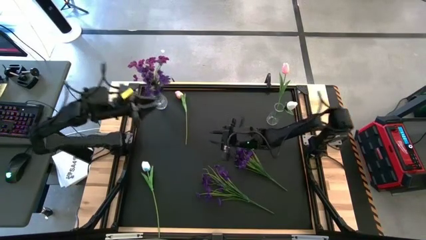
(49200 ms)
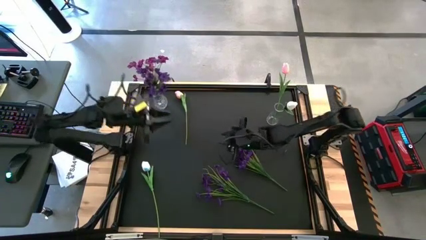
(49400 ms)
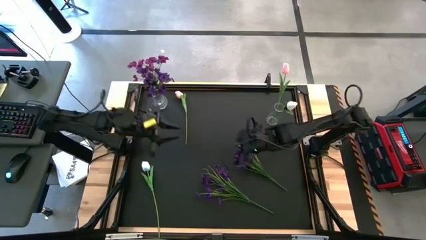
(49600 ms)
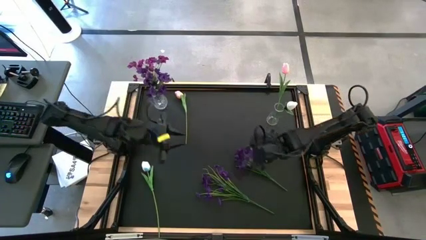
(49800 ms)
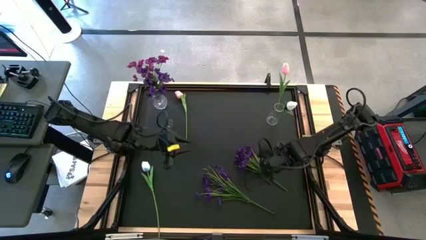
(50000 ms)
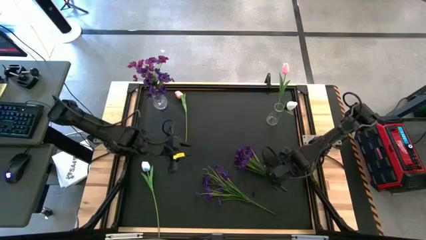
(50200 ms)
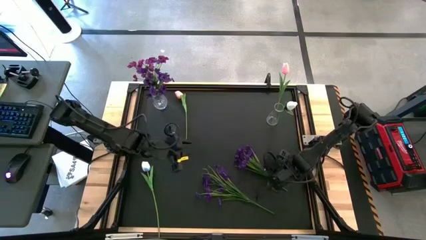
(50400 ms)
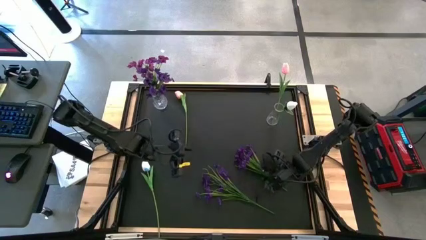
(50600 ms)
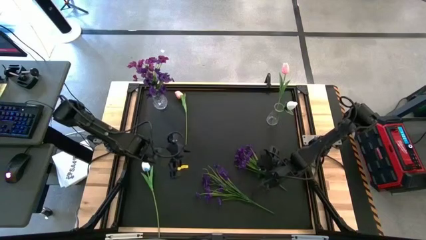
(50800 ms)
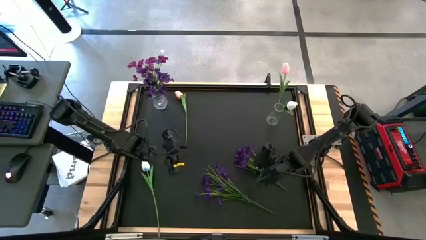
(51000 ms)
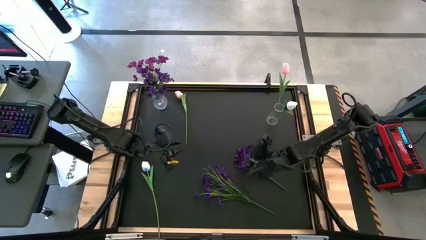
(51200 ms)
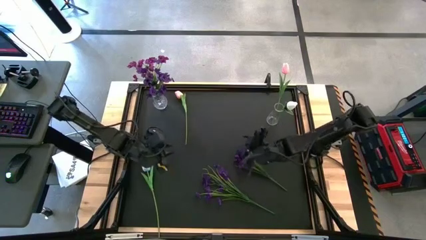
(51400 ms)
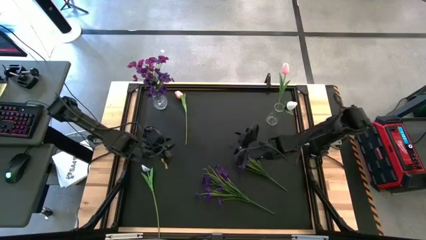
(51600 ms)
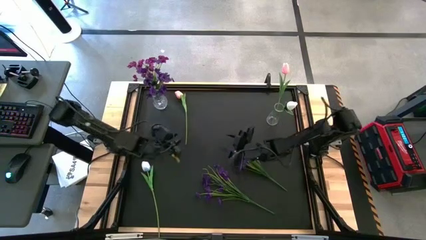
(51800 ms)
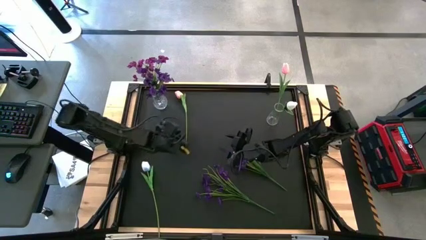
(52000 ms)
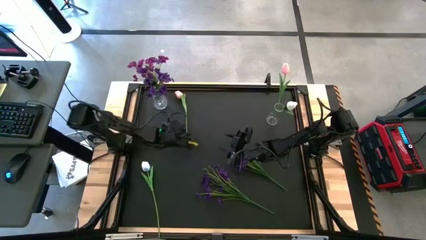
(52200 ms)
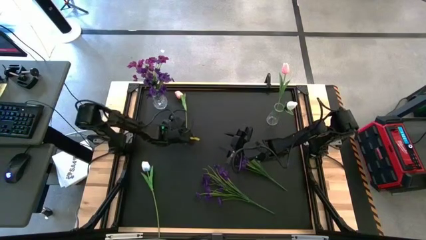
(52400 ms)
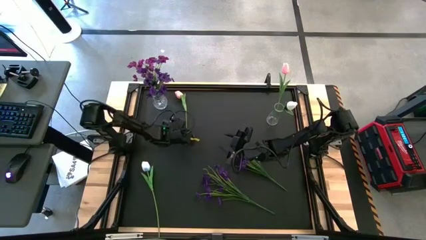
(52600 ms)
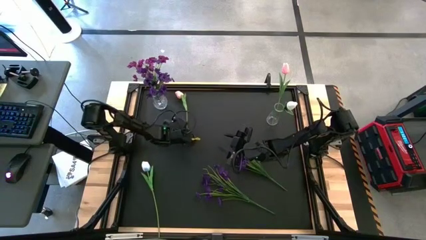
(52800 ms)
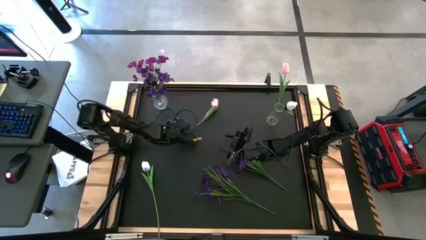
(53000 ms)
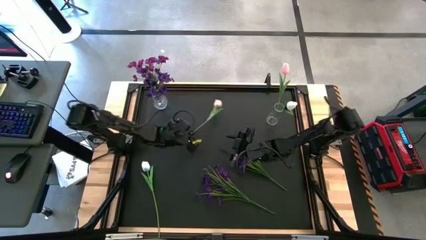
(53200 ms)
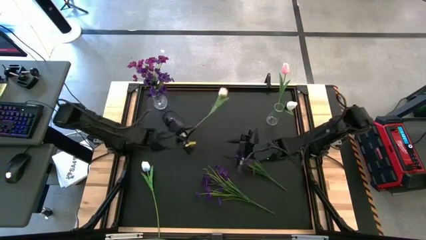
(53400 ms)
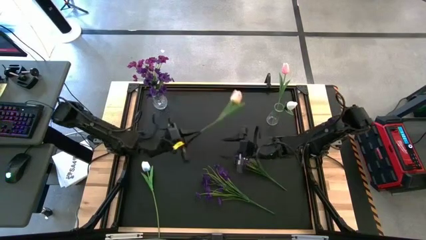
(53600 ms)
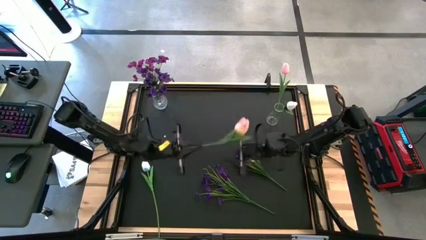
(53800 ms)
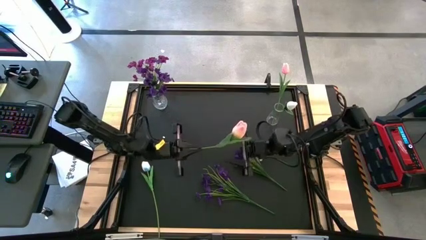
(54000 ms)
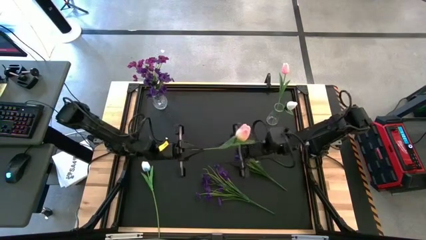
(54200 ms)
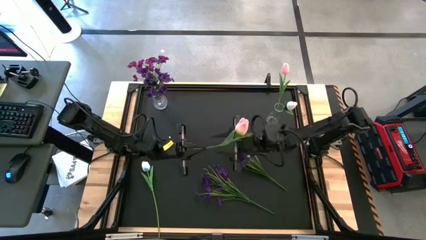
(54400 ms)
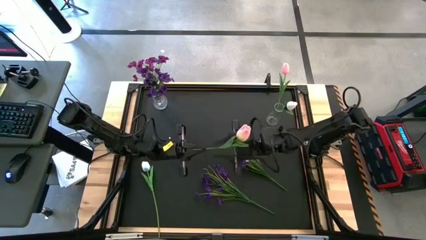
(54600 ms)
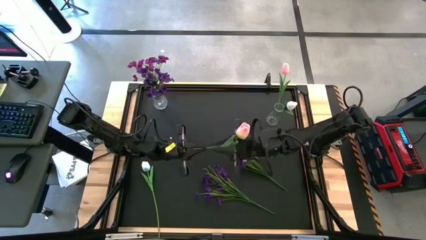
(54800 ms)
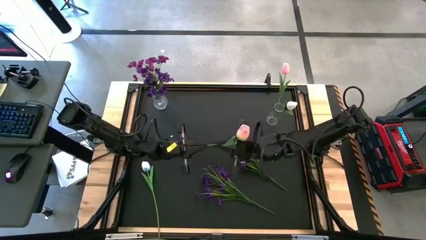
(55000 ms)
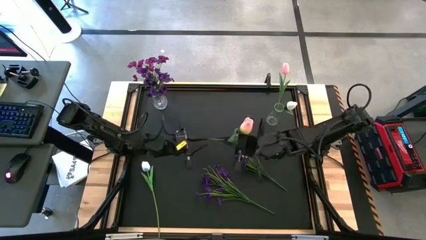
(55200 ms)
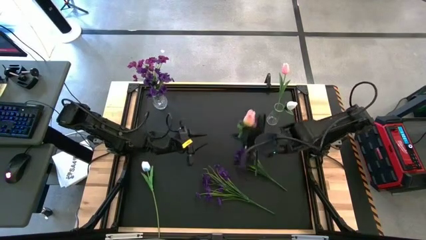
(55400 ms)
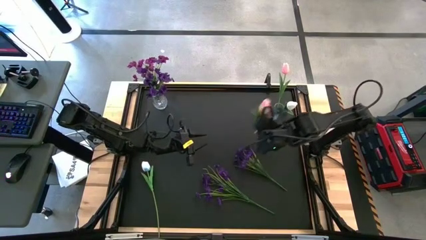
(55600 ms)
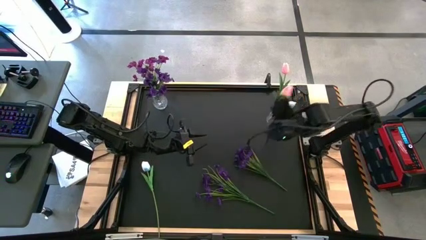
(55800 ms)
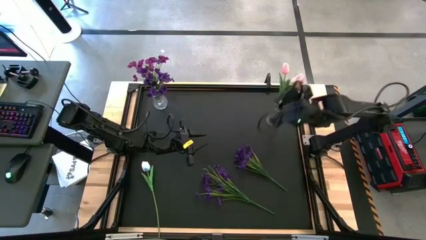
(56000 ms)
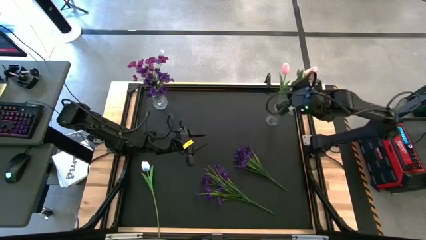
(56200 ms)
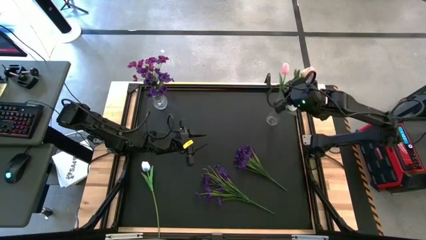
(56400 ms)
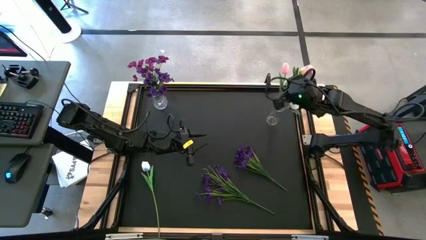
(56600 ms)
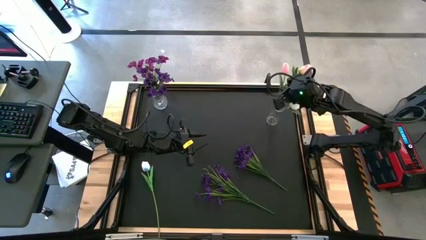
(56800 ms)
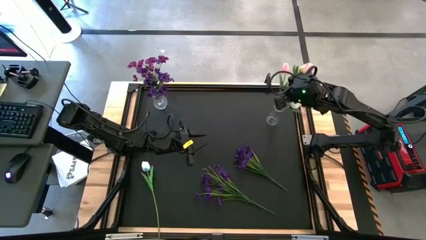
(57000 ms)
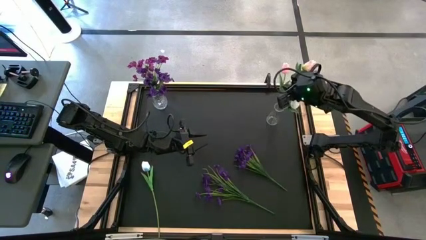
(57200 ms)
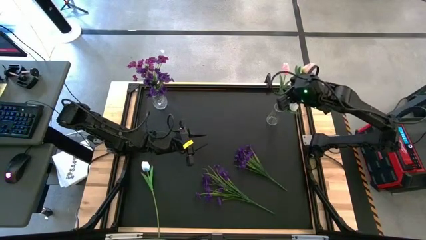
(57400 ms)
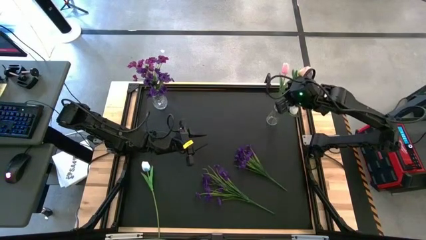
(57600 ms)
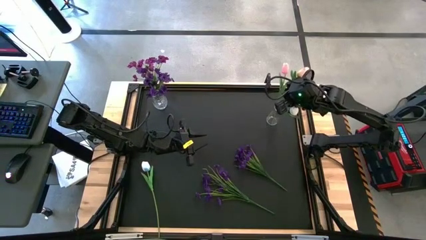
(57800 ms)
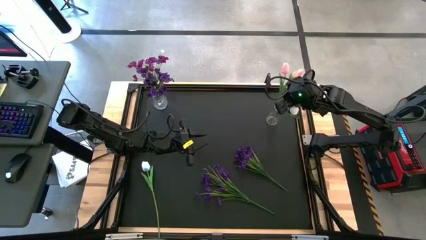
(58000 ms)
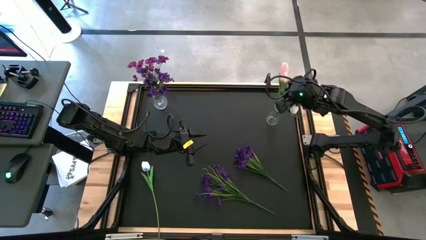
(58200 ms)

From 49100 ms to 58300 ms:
Task: Sort flowers into vase by color
Put the pink tulip into the right transparent vase

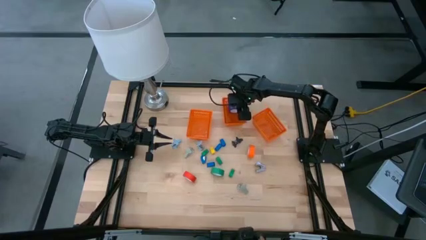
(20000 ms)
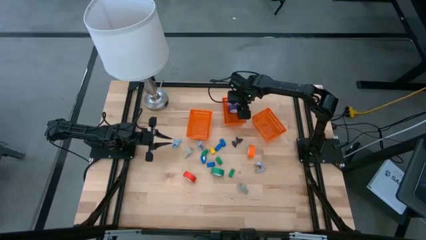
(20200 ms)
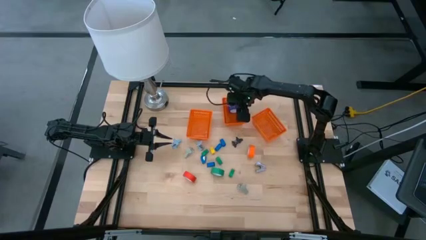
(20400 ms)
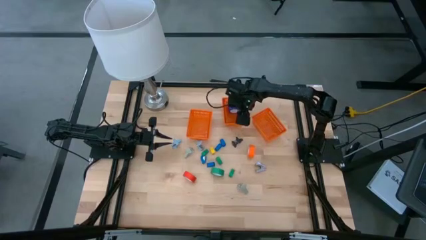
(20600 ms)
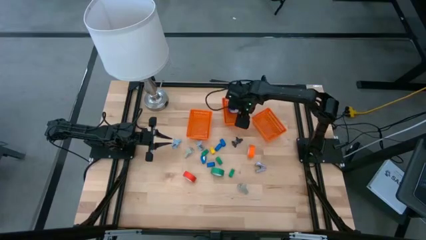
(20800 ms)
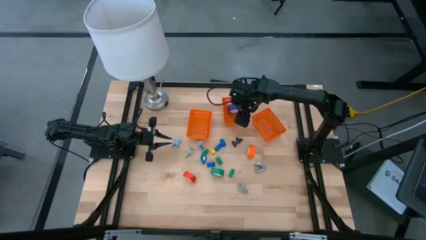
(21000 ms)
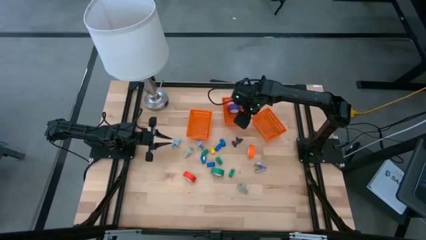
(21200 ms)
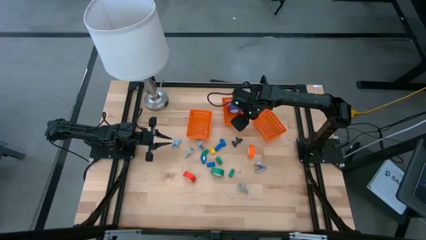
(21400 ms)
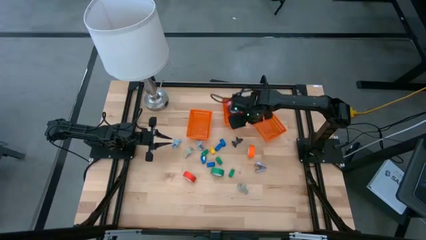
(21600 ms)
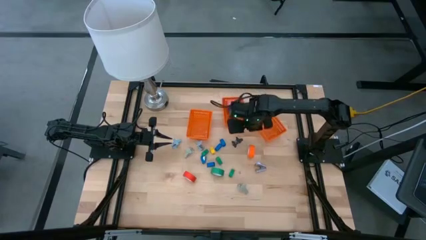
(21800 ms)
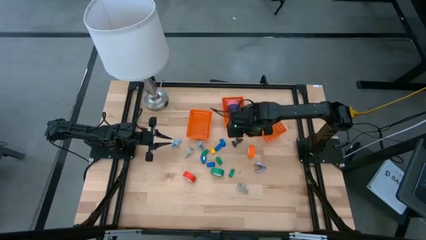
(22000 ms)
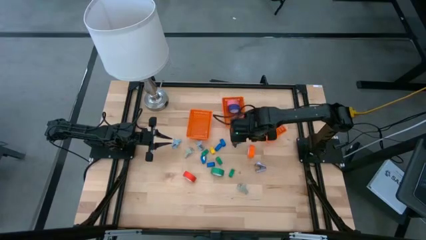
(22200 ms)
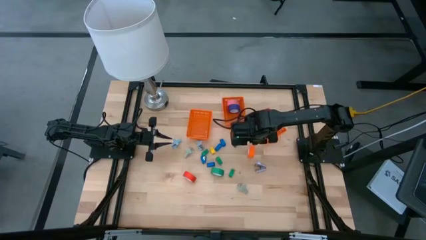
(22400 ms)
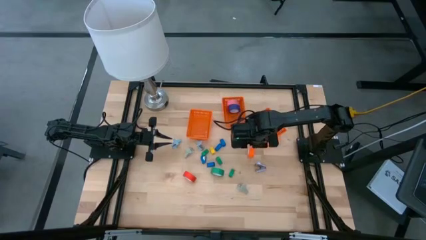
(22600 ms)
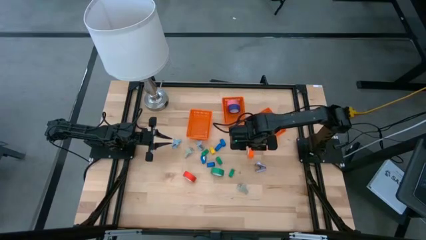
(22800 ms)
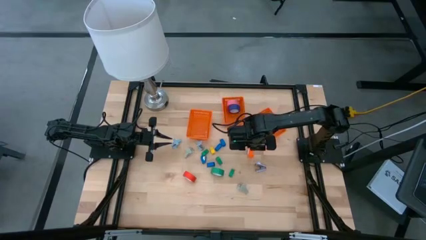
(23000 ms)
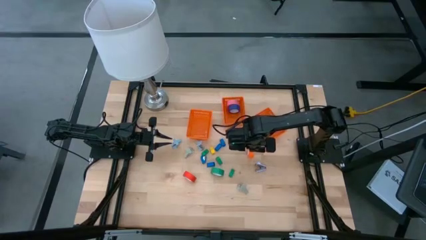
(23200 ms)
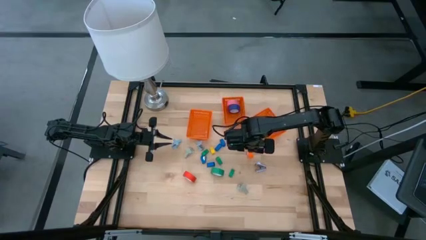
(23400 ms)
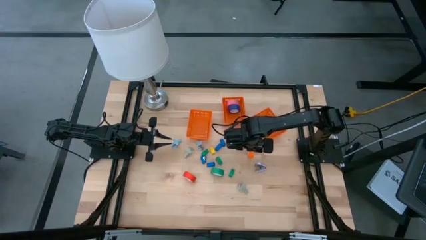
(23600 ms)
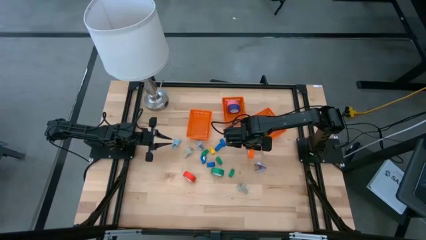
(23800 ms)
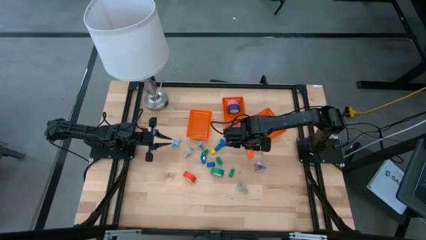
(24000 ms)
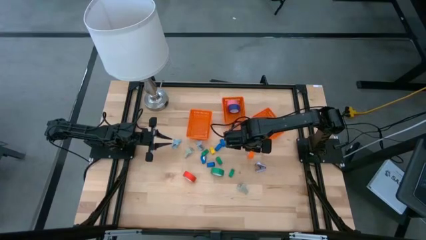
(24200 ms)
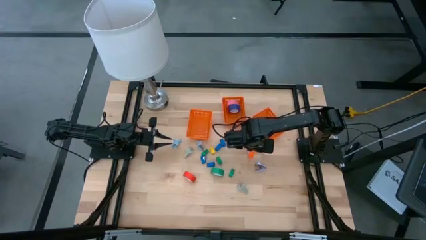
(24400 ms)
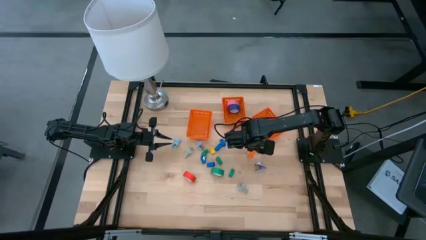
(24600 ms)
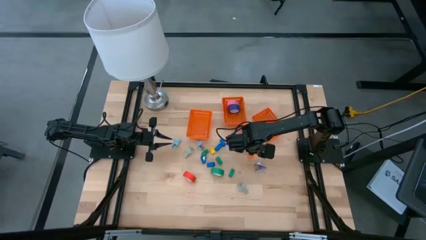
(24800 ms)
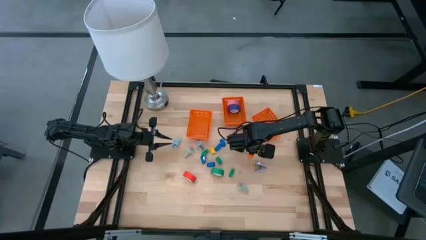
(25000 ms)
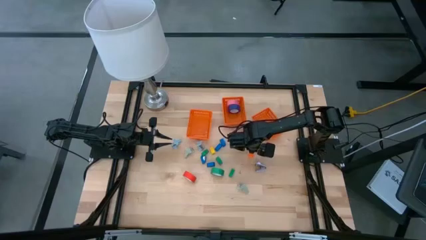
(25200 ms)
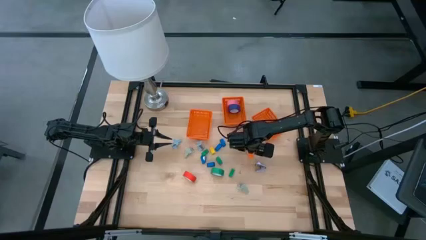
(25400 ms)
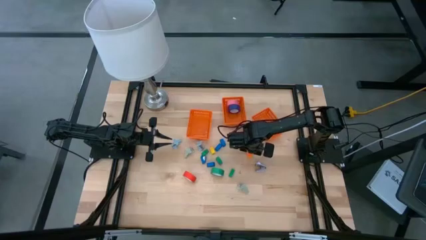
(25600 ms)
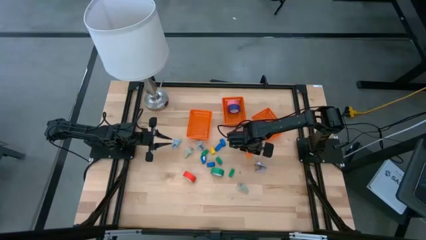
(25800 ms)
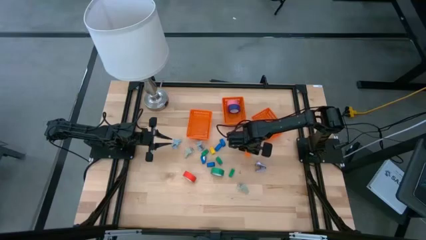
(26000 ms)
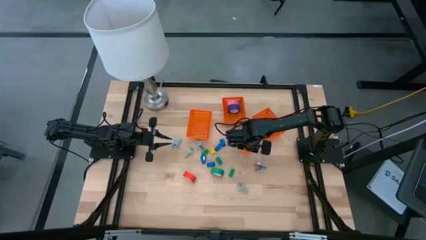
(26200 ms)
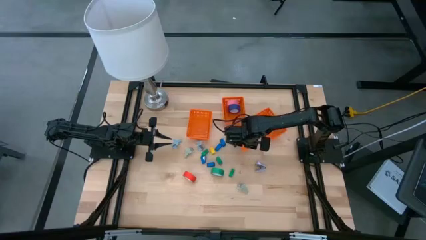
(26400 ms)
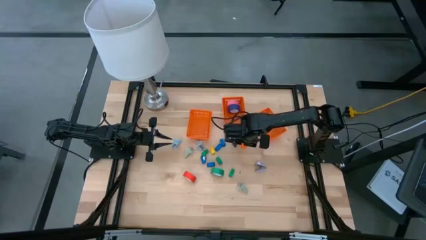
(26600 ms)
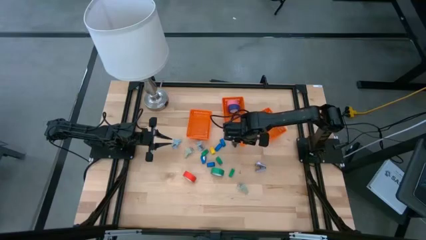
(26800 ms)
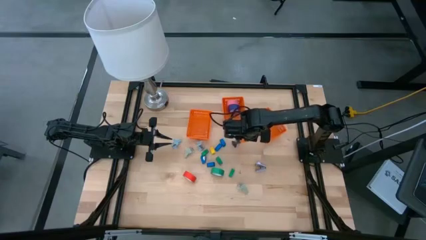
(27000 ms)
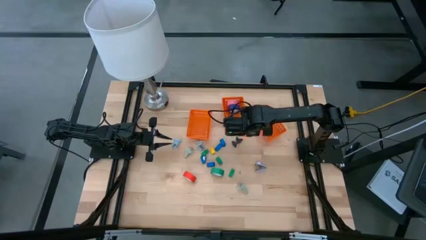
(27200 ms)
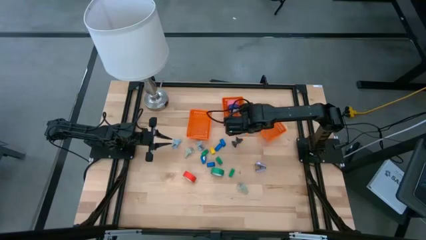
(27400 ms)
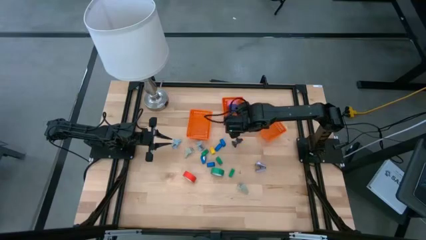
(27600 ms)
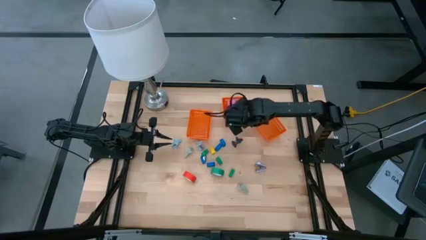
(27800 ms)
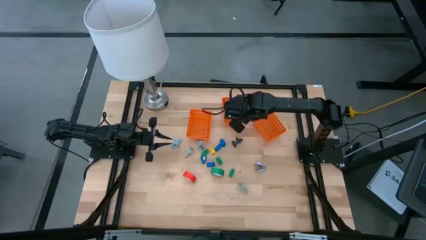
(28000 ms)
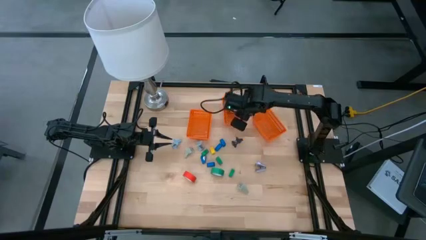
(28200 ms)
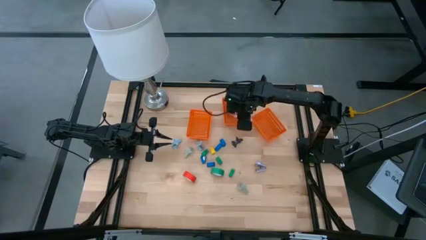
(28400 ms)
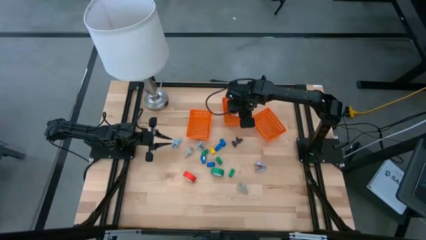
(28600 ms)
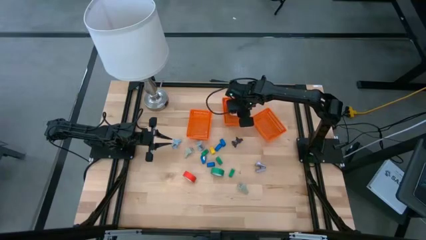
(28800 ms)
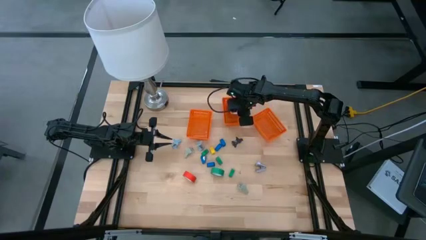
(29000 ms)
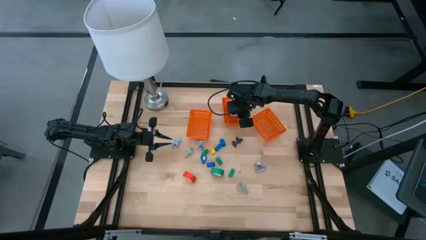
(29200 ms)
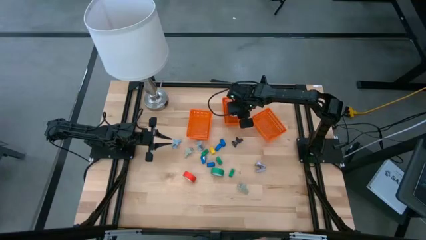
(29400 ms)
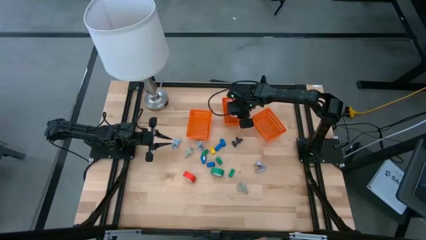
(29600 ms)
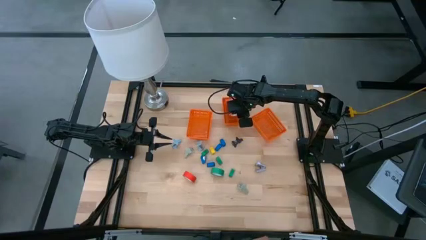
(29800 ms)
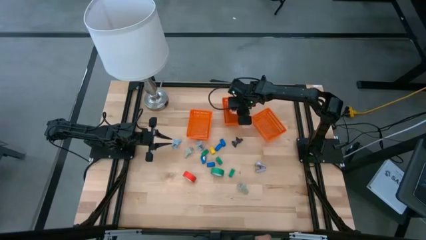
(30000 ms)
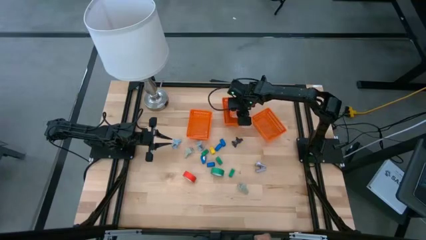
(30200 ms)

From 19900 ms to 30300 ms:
Task: Pick and place Stapler, Stapler remover, tape
Put the orange adhesive tape into the middle orange bin
